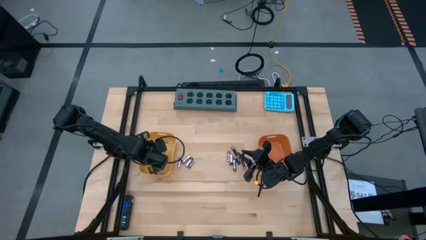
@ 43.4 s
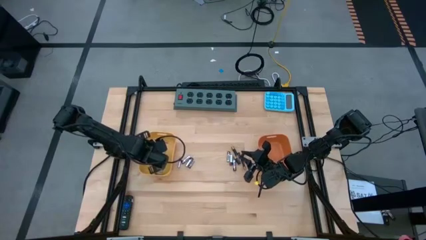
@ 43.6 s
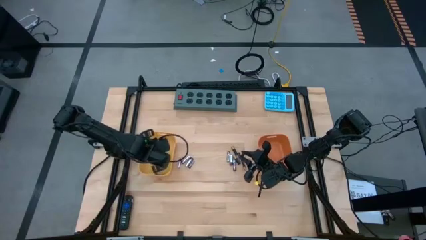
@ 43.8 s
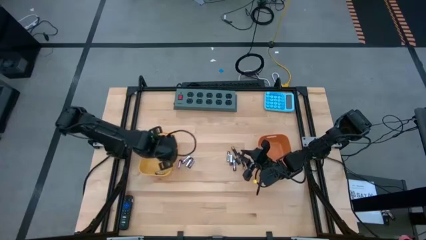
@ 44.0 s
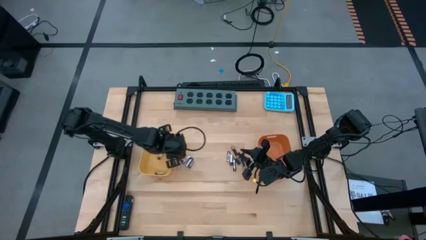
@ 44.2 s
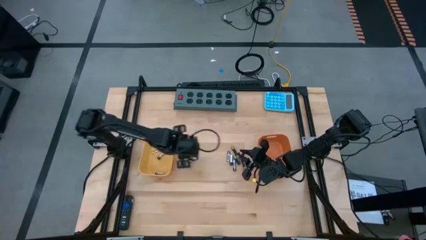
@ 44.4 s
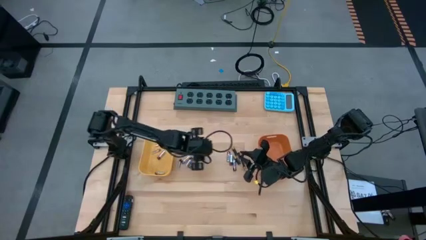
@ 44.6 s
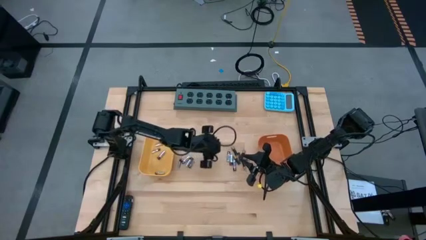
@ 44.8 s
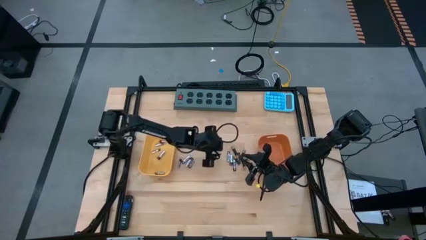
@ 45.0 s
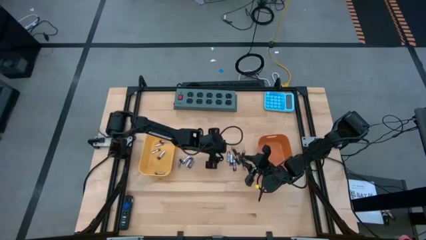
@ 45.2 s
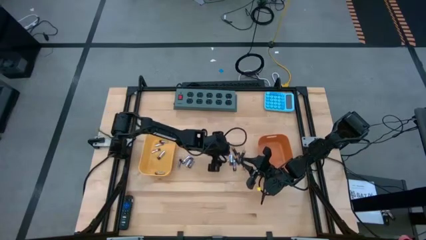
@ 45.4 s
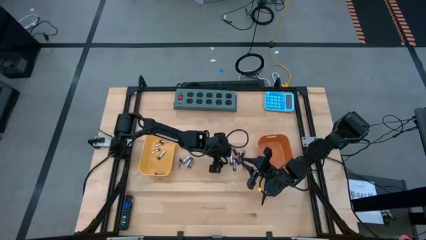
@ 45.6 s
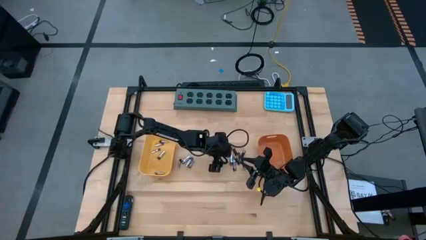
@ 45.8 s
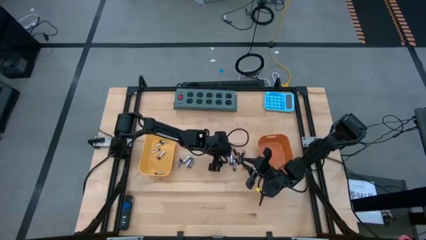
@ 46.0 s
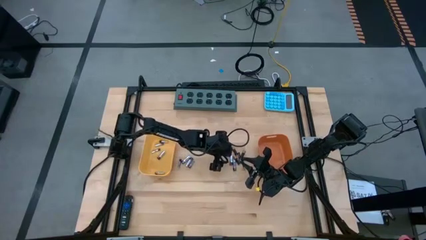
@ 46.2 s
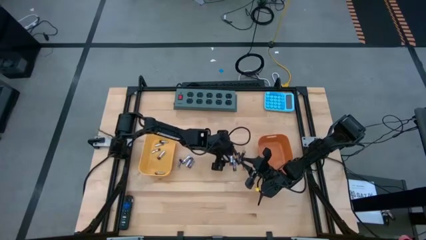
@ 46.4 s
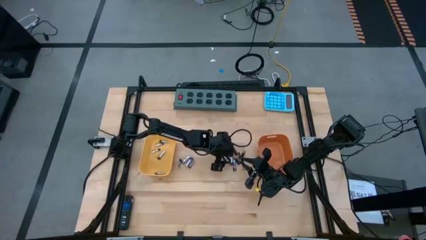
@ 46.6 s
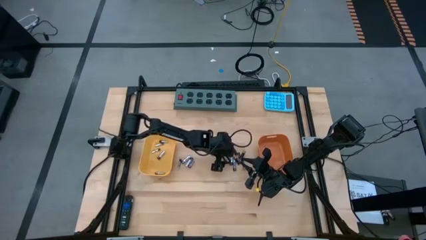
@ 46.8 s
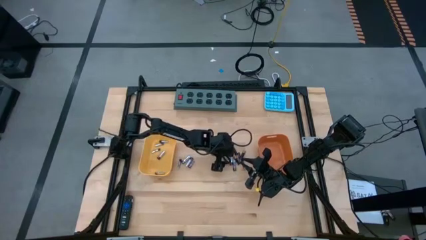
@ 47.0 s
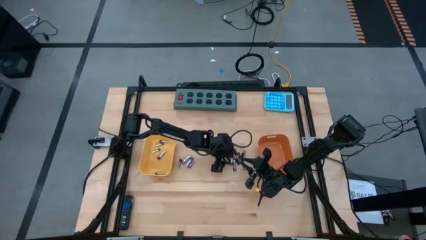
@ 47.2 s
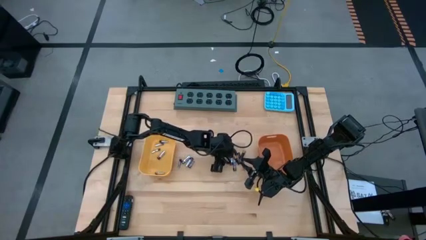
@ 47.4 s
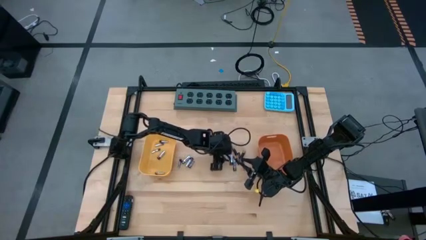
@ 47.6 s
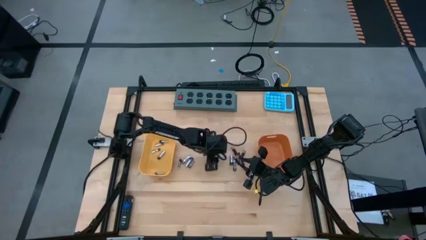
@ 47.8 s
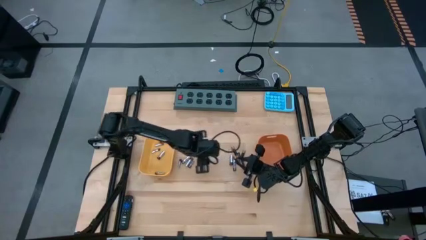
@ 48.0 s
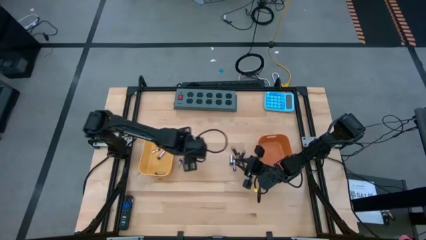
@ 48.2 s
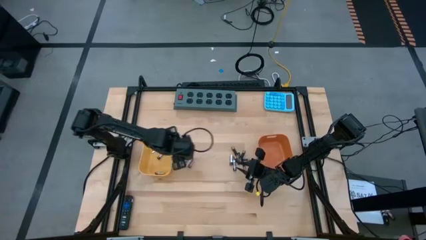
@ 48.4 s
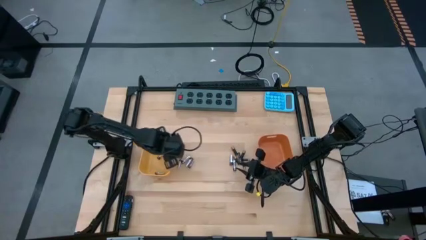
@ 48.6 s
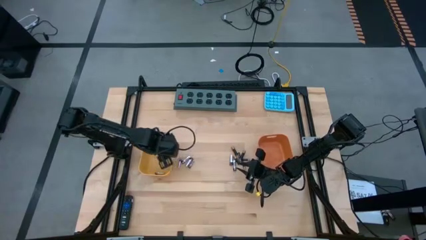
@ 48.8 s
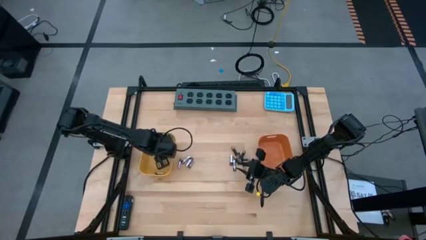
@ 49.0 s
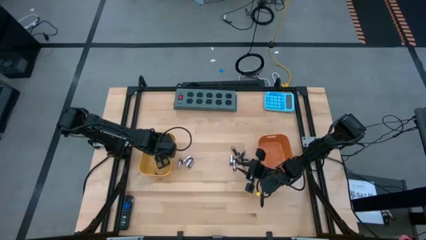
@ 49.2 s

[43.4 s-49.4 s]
Task: Sort batteries
Put the silver battery into the yellow bin

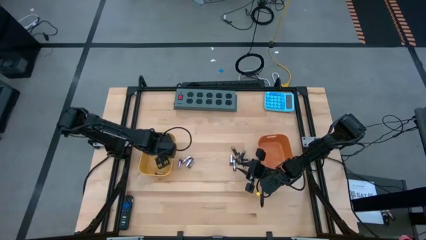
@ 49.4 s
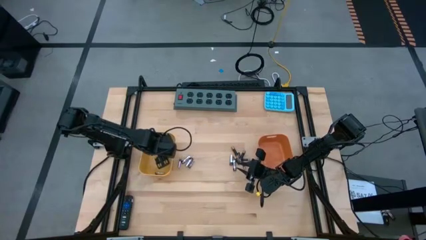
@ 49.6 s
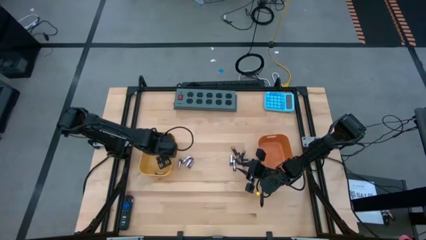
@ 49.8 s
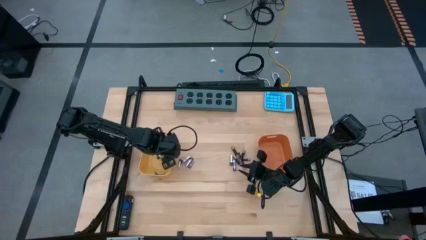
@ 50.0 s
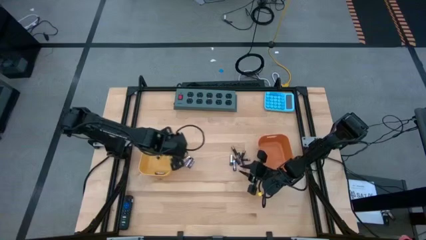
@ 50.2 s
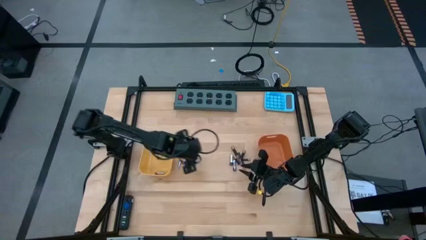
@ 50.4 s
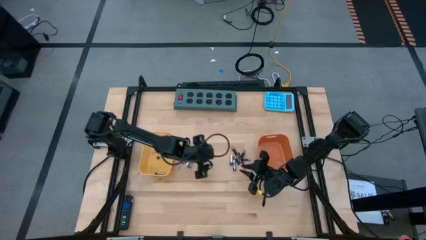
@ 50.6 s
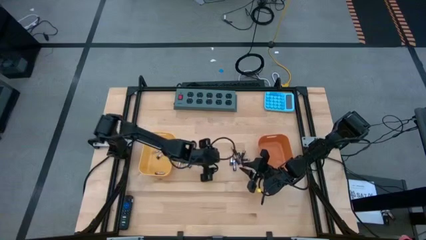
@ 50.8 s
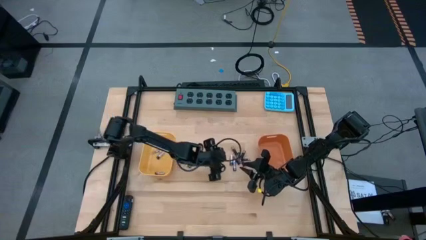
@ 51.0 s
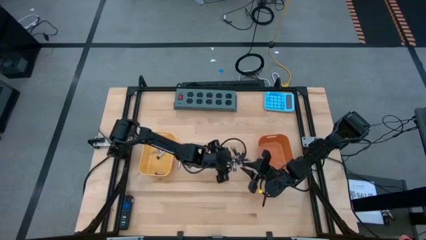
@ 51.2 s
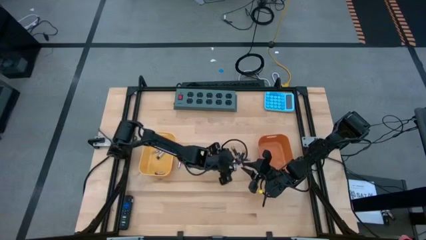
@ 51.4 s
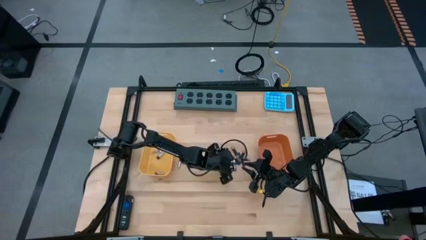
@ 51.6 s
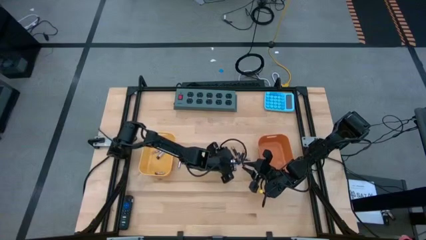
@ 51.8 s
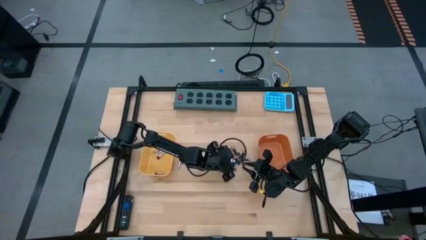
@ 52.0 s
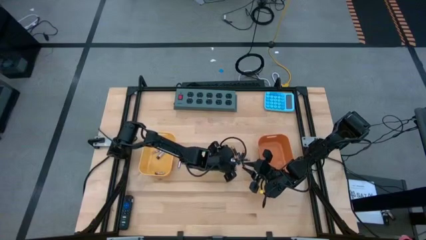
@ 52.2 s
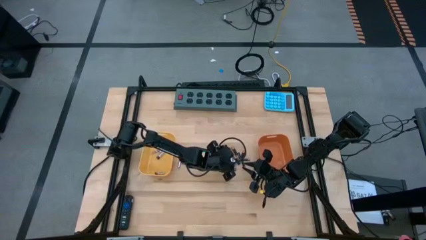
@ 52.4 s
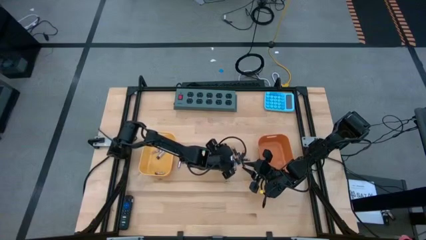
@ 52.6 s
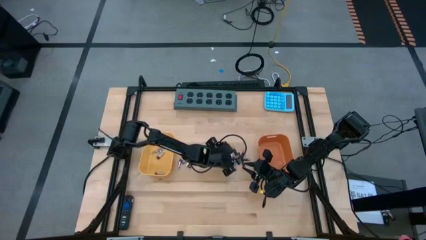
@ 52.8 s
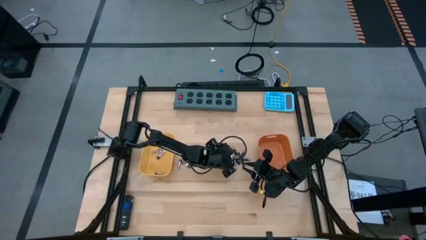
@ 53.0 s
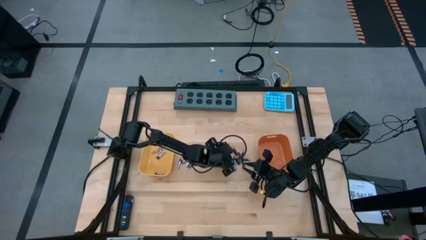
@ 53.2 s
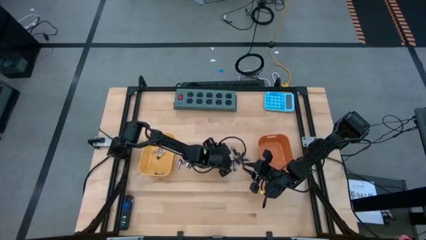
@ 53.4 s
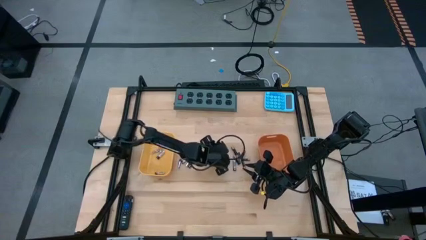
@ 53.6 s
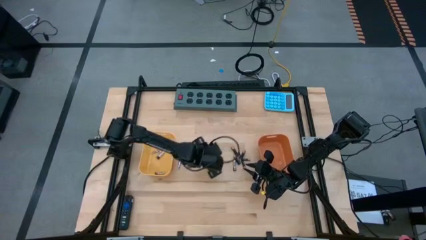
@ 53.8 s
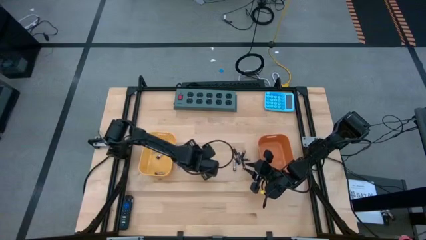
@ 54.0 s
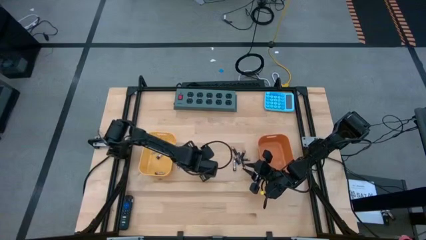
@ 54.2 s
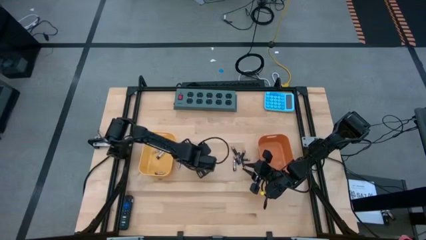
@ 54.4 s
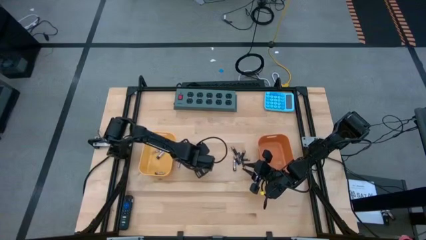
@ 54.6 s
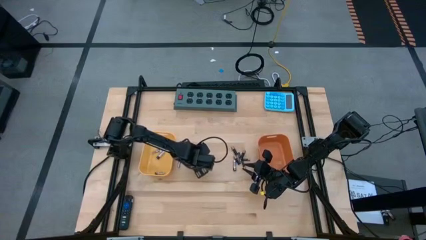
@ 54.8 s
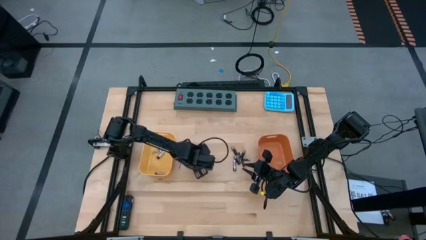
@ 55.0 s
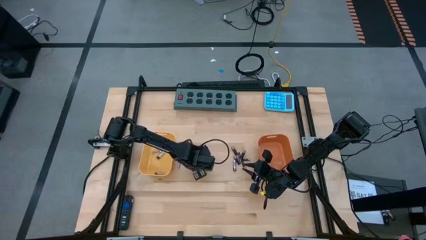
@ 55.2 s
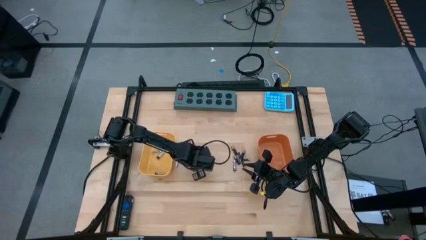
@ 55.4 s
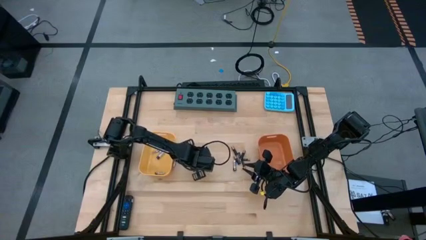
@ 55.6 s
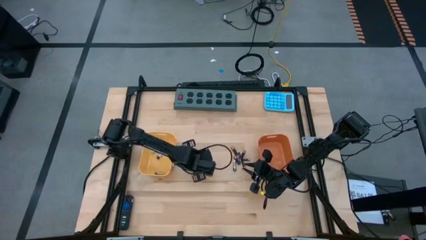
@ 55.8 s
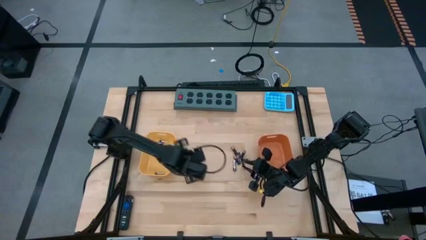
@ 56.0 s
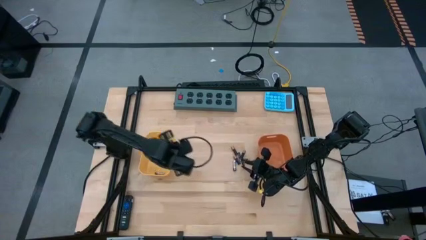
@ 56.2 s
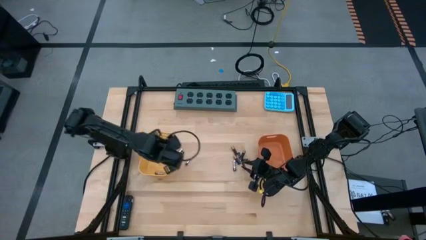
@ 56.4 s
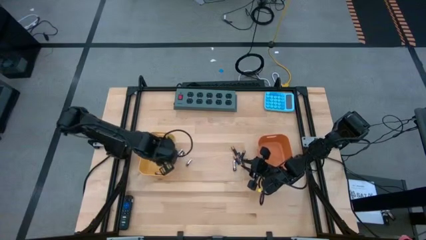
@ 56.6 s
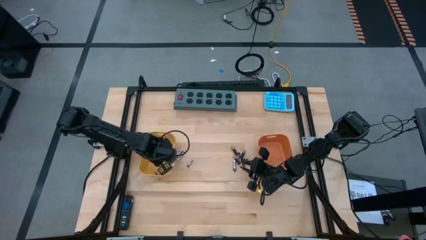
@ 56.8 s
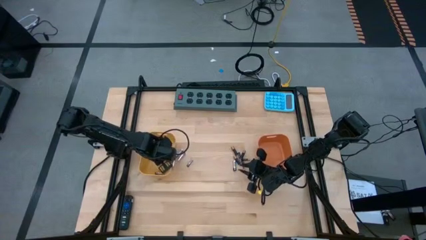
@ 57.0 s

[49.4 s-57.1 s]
Put the silver battery into the yellow bin

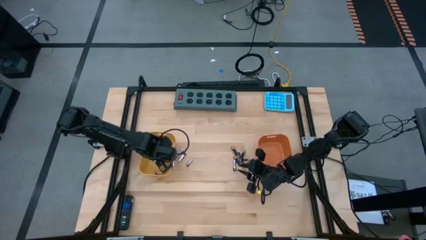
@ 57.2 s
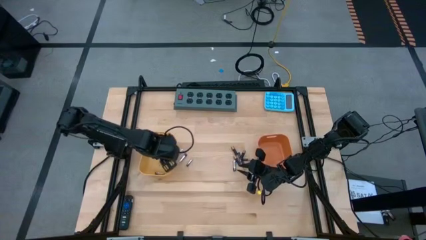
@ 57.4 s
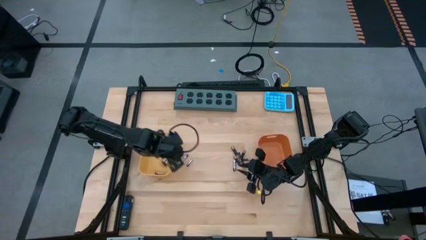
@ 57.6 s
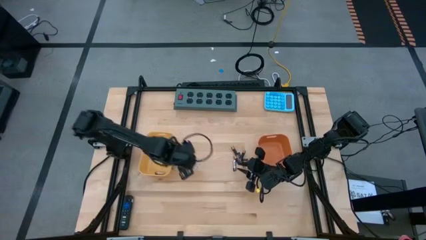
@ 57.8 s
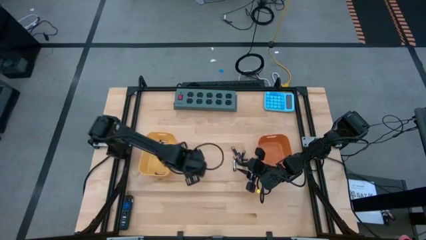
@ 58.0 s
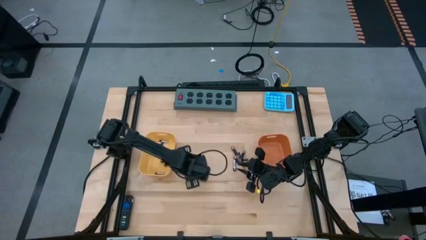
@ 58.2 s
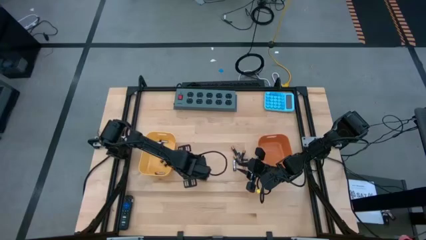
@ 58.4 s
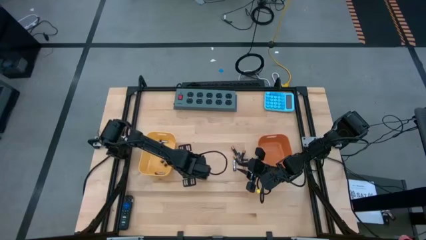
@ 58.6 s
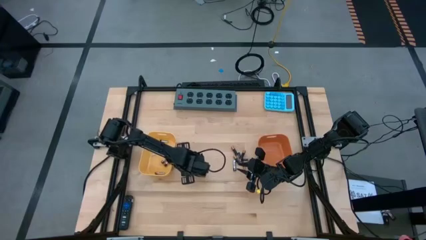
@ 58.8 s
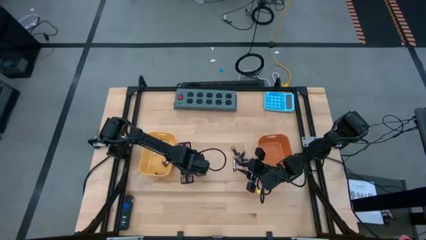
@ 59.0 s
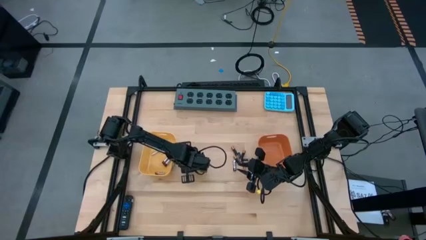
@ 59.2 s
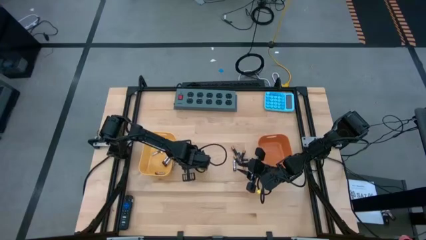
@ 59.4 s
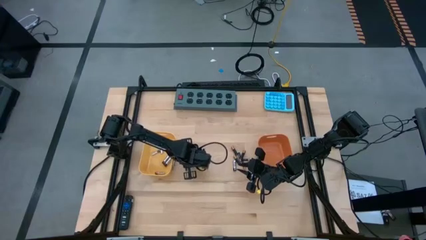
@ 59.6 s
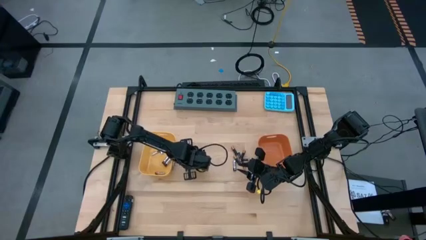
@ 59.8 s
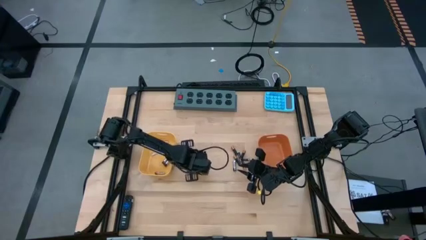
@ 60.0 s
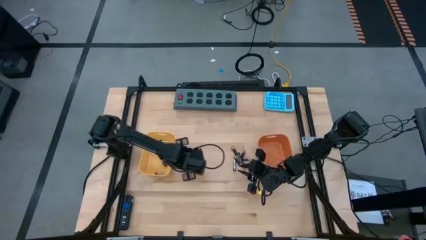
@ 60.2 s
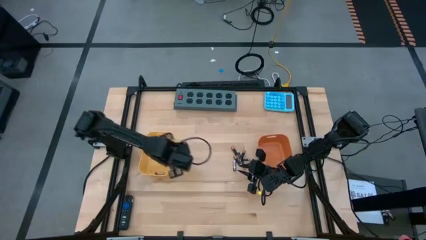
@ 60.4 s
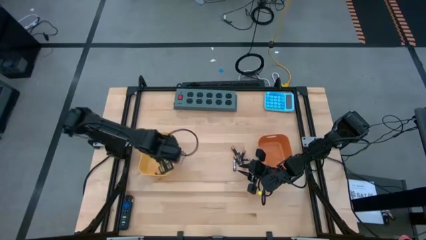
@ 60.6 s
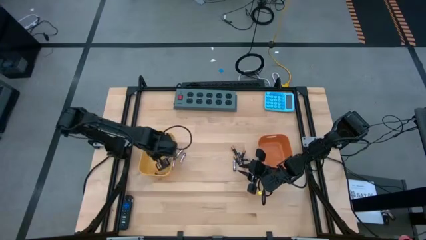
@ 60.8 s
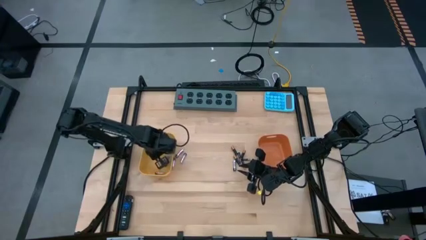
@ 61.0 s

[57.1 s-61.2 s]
Put the silver battery into the yellow bin
